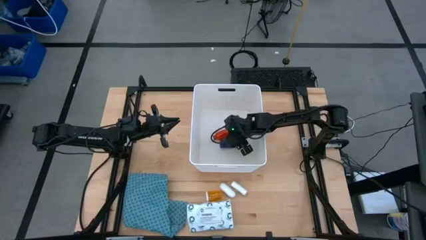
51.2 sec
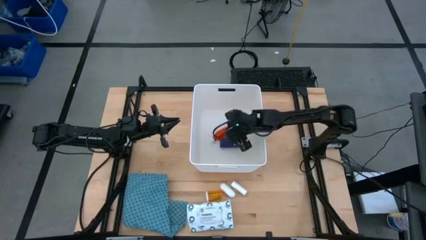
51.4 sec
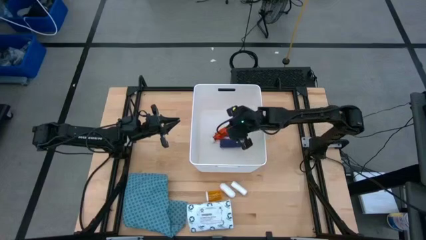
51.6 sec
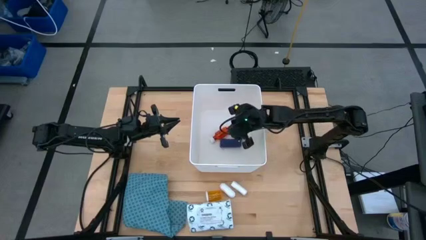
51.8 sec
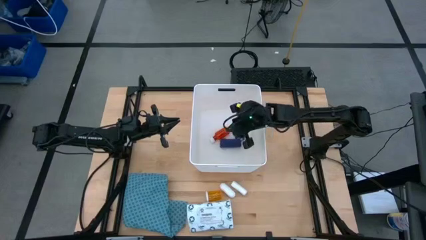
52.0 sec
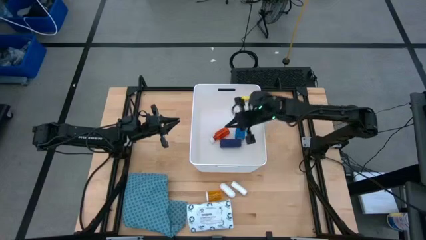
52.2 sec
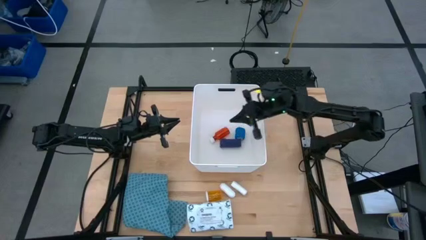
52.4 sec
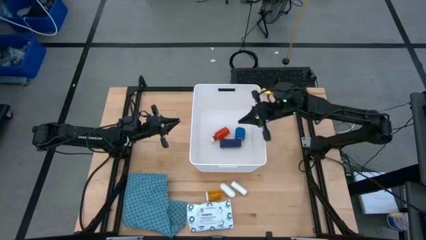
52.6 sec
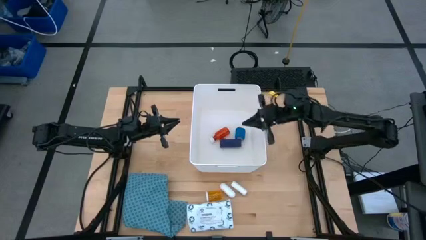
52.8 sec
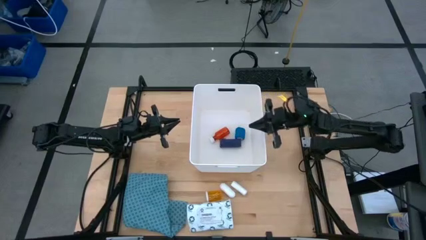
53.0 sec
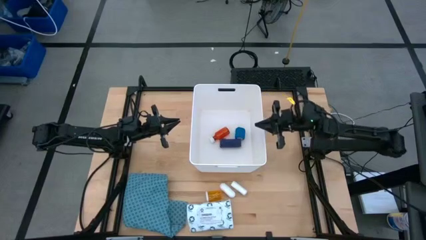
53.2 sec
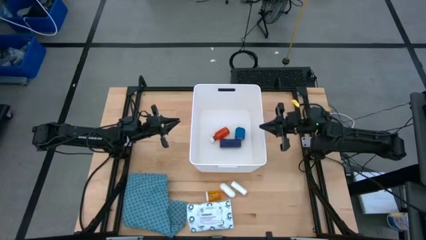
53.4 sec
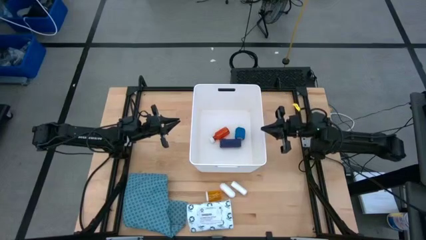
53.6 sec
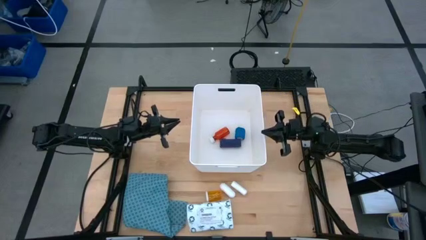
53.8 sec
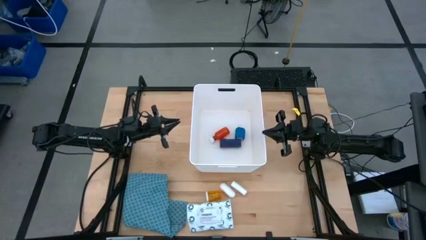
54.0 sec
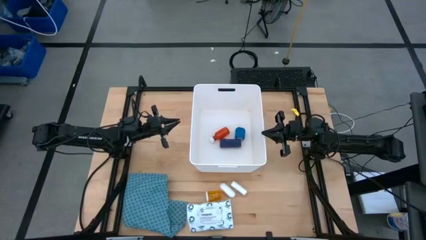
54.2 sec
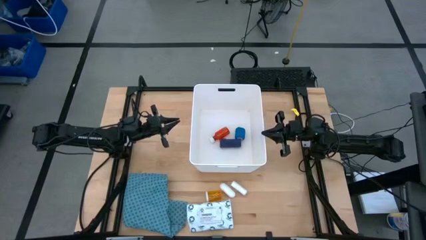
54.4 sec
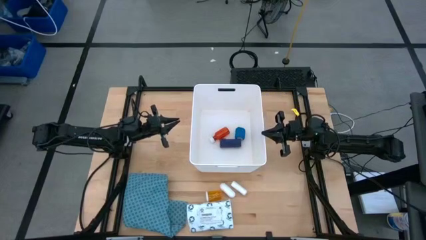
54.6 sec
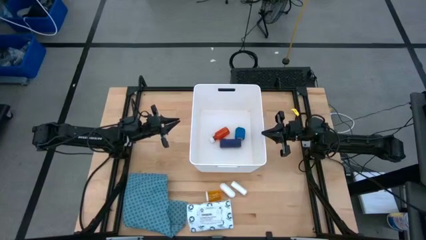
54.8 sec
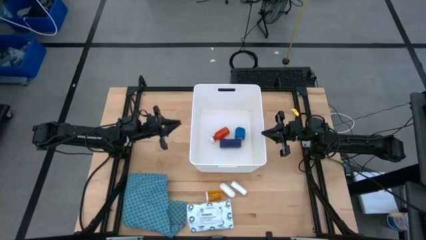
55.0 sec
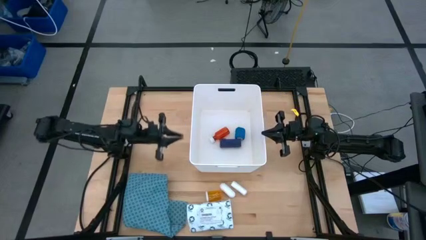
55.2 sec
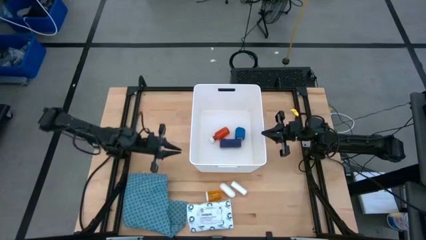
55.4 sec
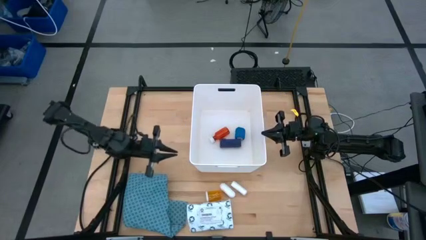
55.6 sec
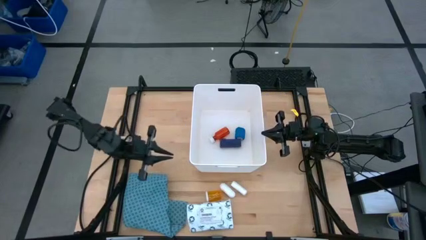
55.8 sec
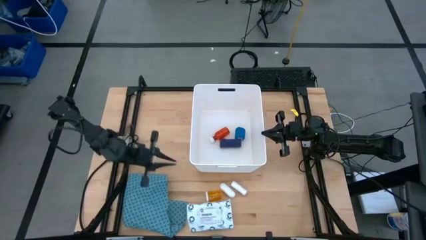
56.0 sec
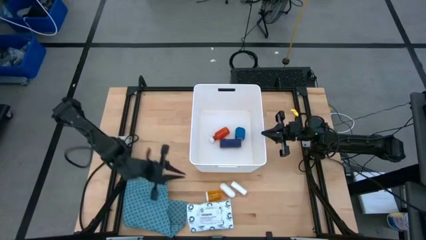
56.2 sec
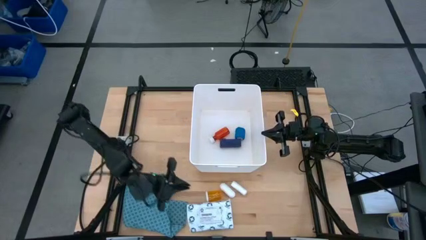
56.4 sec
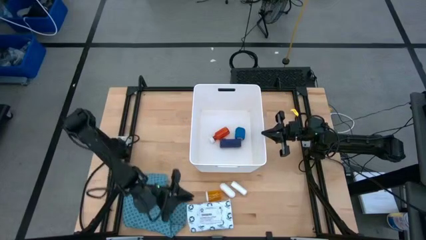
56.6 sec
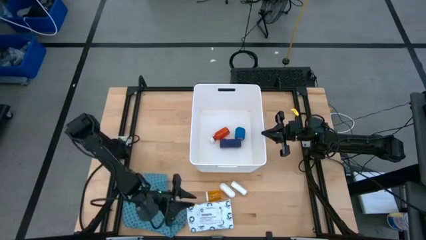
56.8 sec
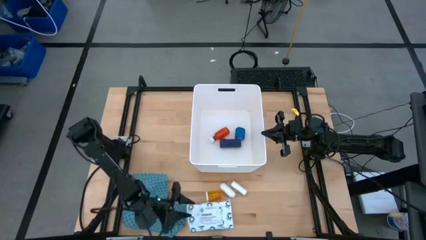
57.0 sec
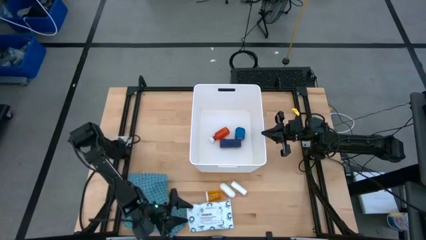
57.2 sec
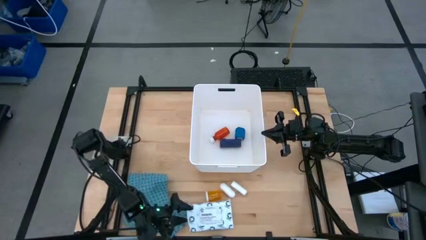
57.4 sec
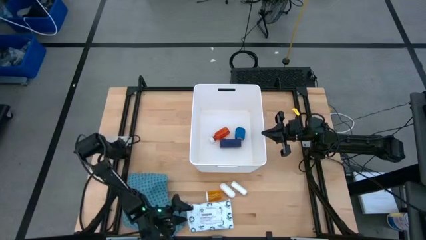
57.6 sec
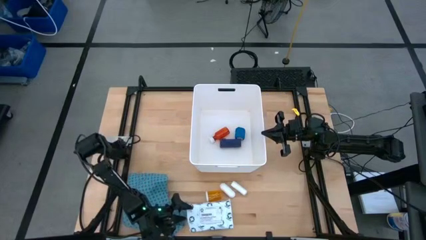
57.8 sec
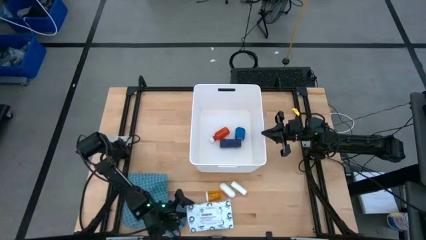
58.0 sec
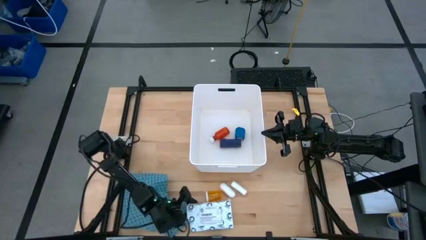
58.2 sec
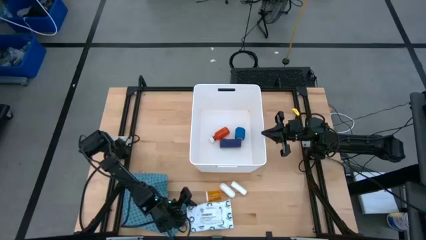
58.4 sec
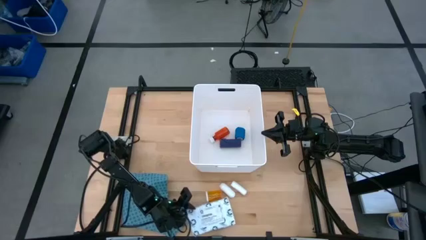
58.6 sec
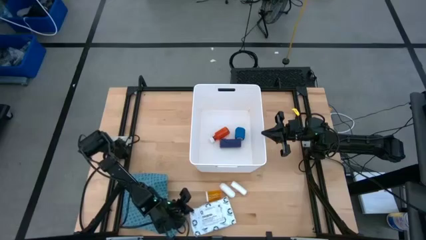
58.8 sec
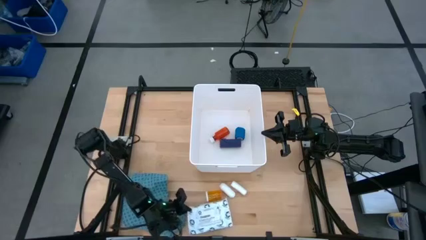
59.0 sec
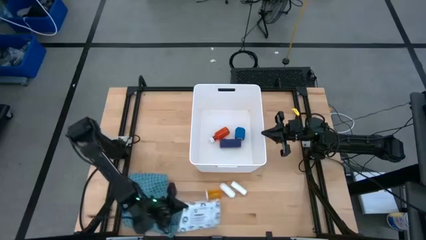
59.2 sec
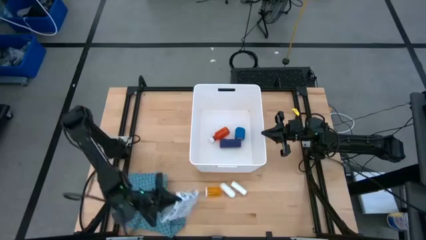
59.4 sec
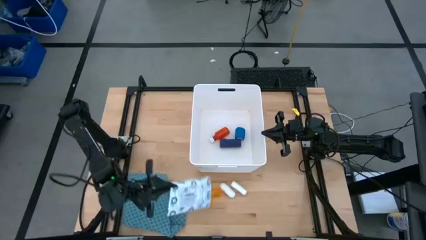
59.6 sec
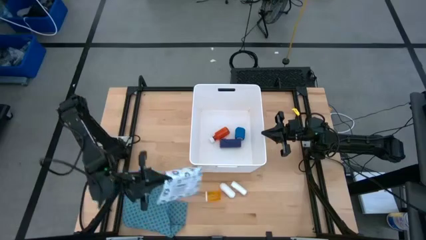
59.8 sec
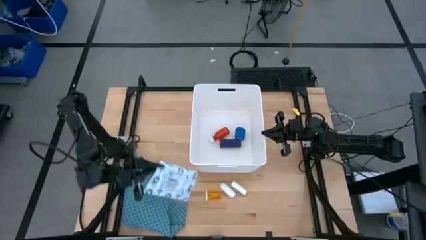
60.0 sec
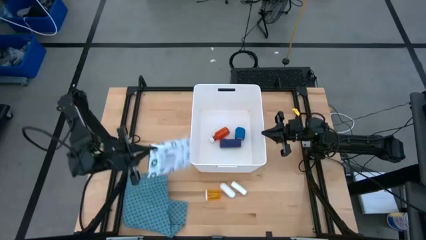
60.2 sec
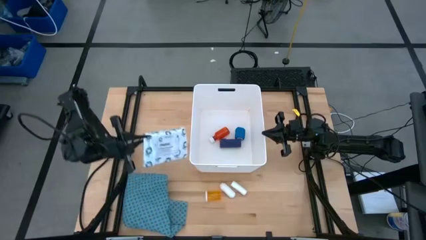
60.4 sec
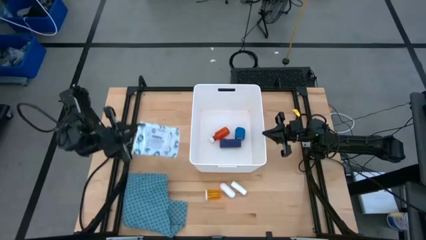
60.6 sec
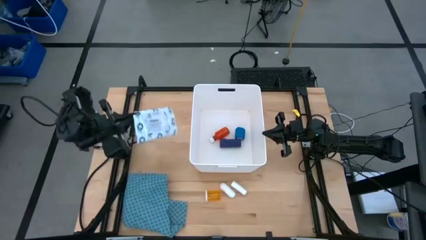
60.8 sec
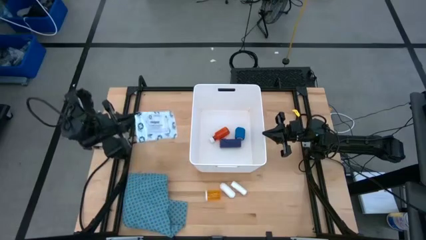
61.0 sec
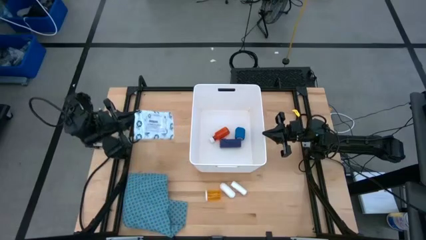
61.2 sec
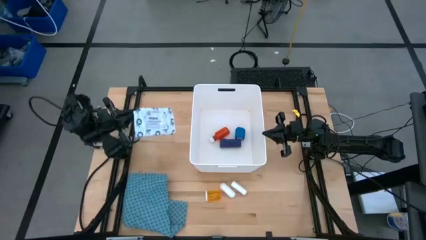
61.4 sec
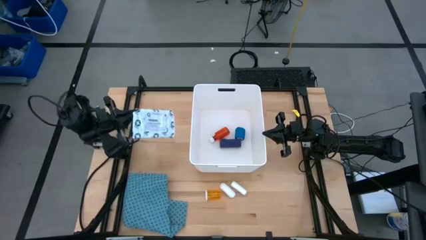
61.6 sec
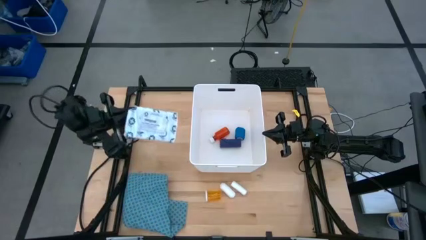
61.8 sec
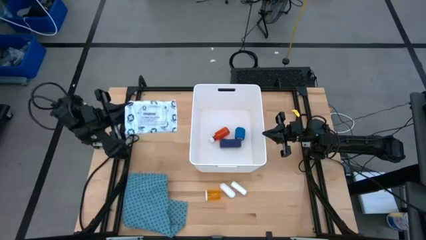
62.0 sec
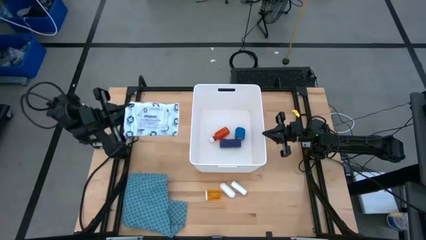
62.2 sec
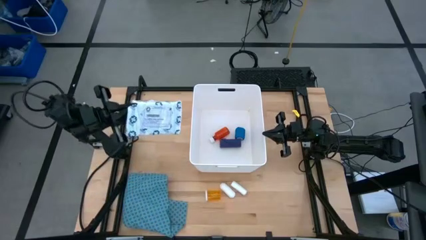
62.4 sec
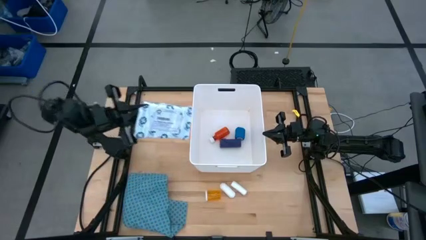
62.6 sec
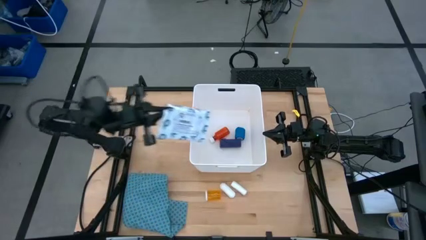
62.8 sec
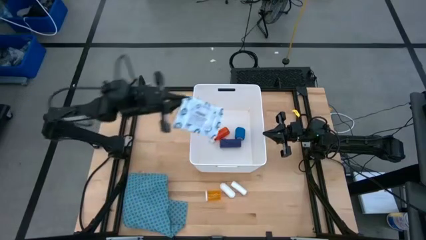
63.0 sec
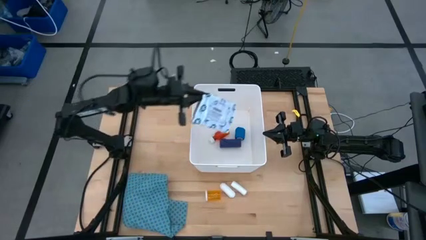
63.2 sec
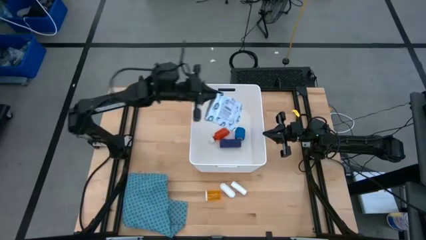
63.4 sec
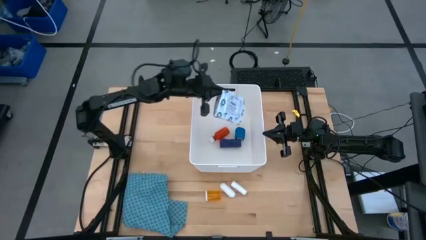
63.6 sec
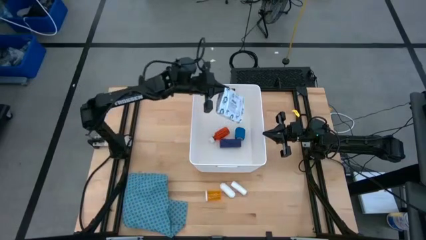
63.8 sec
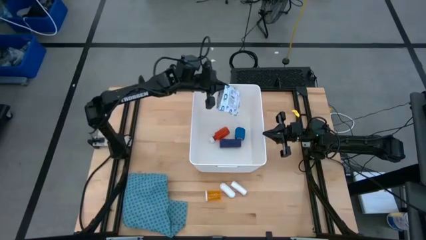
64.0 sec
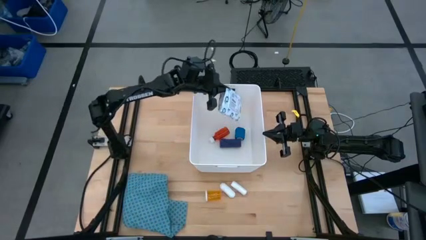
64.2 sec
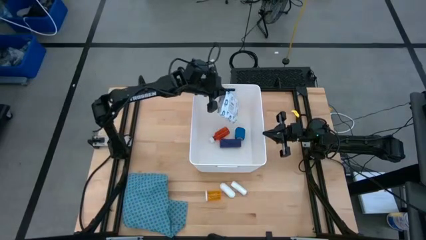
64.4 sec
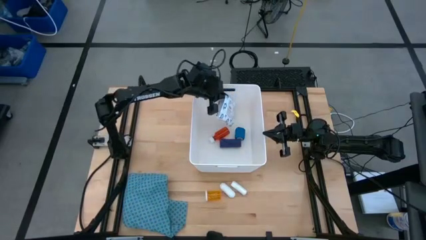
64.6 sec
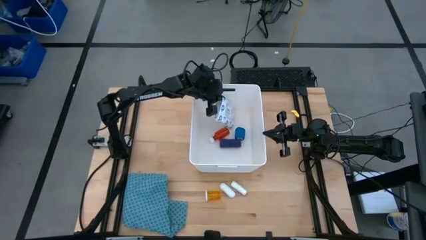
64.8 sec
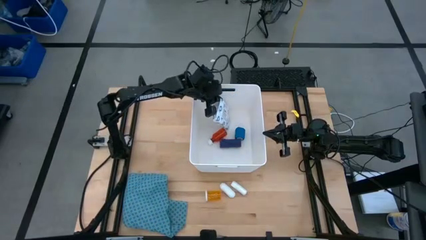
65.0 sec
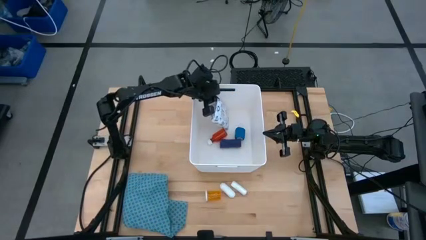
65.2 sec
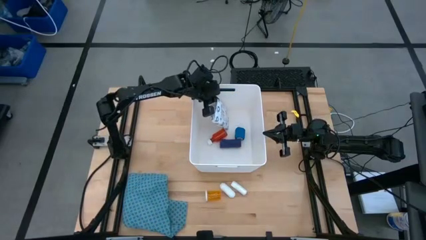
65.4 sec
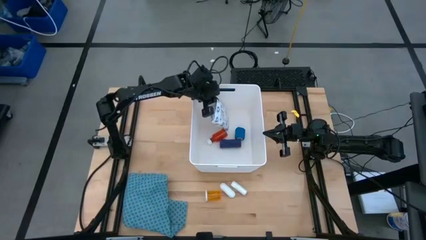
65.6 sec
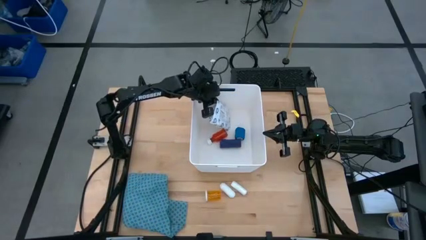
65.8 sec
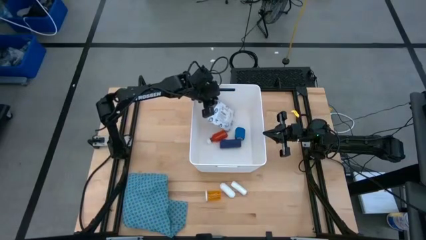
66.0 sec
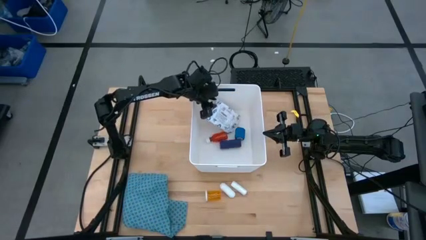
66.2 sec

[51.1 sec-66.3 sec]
Task: Pick & place medical supplies in basket/bin
Put the white mailer bag into the white bin
